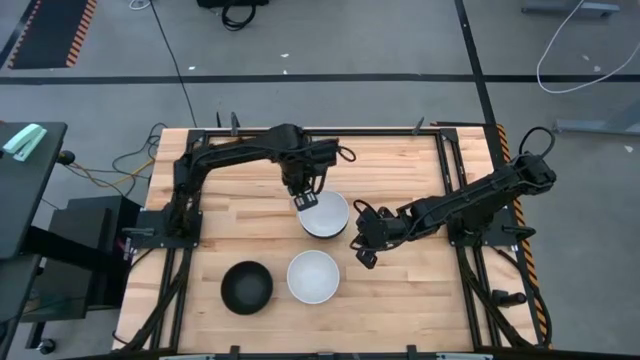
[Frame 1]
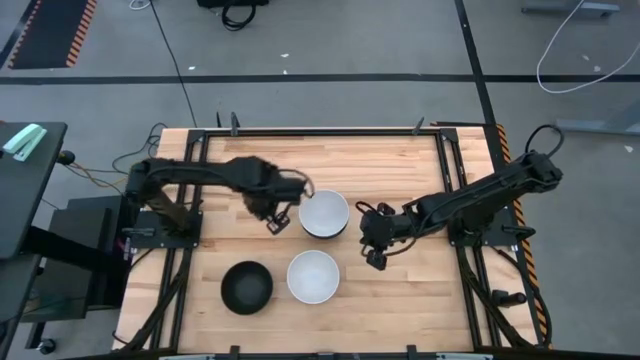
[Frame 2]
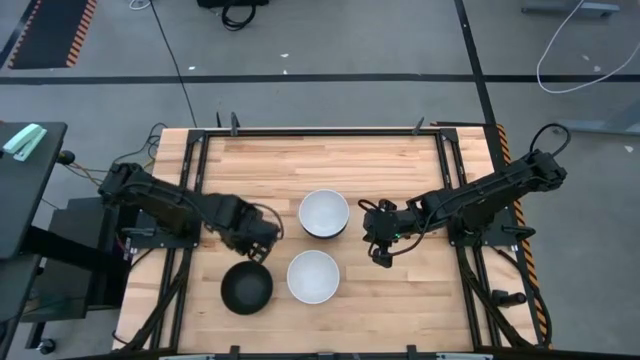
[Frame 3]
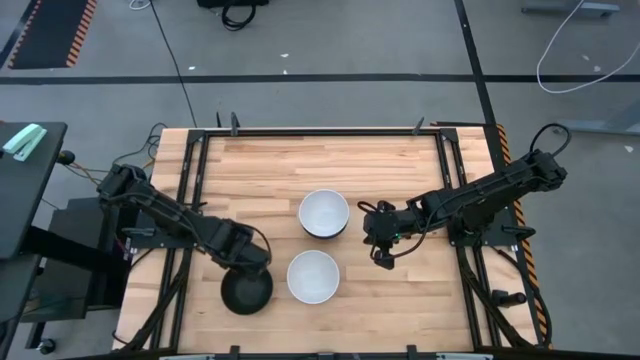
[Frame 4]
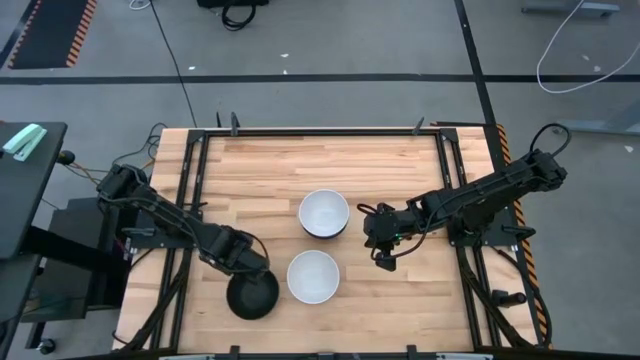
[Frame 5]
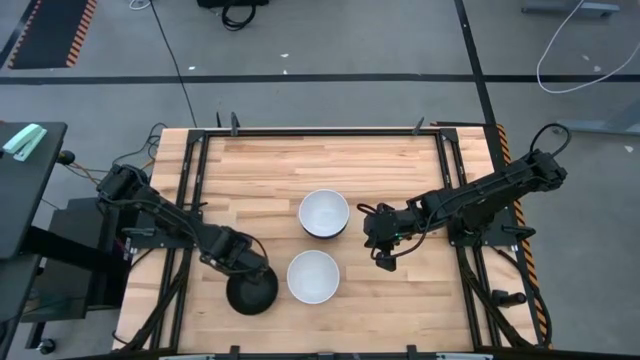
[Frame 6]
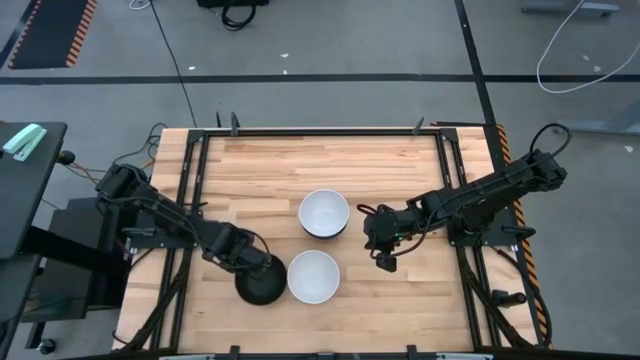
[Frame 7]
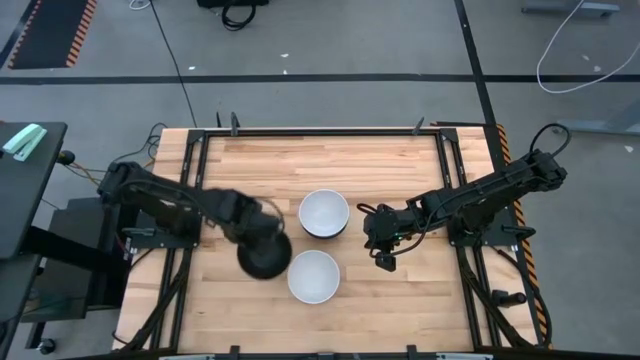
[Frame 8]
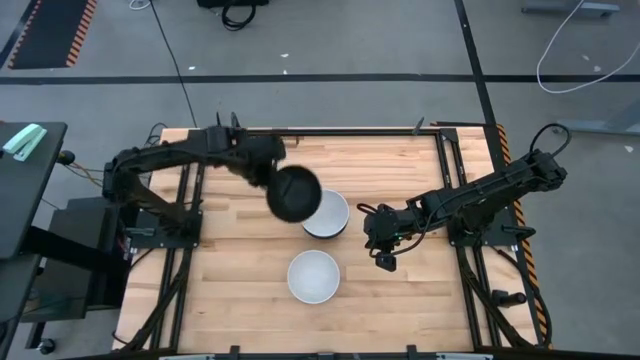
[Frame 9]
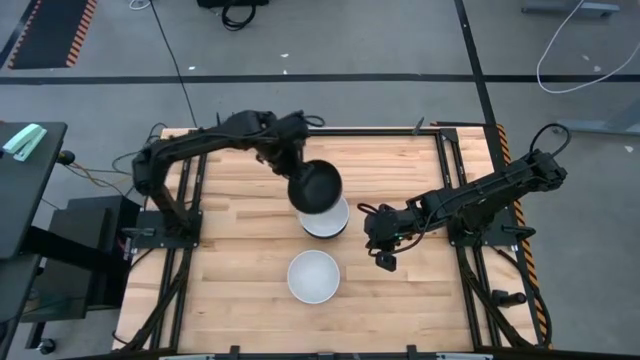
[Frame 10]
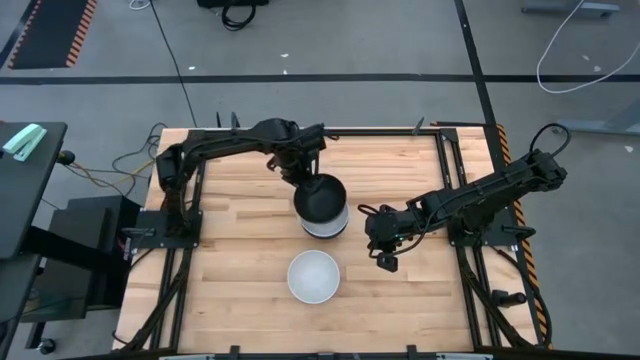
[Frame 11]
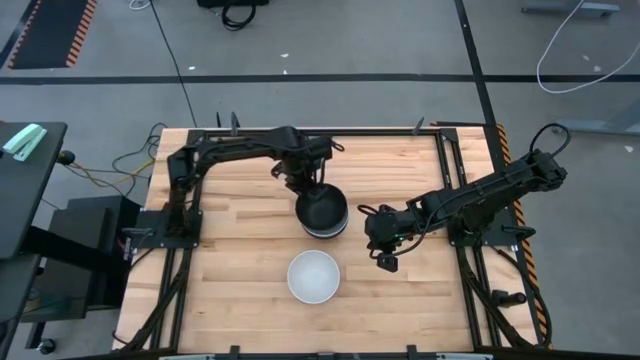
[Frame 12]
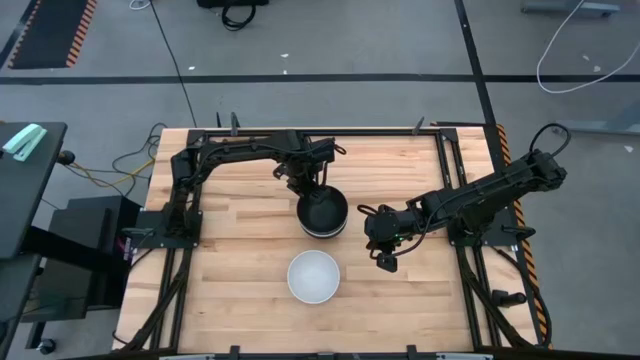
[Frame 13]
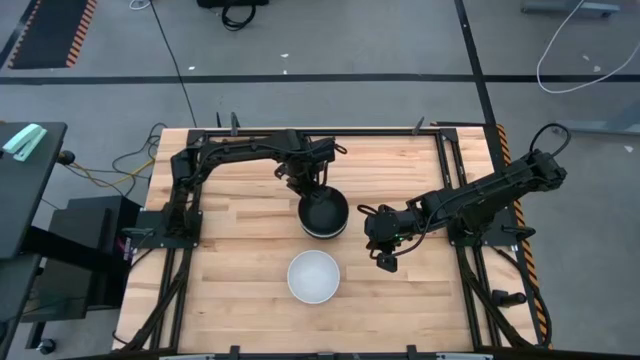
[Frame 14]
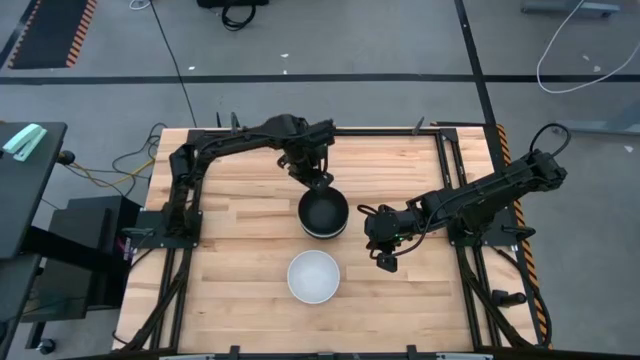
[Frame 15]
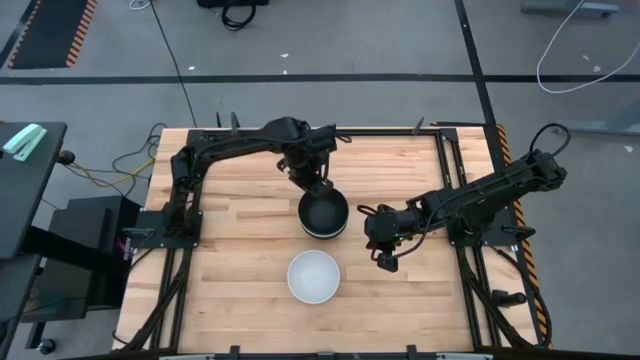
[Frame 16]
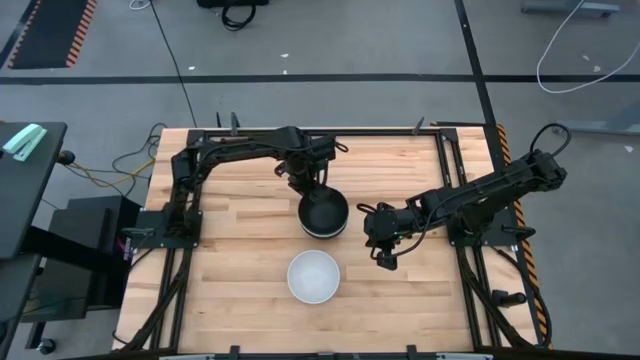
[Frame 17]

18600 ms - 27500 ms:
Task: Nest bowls inside each other
Stack the black bowl on top of the stacked bowls

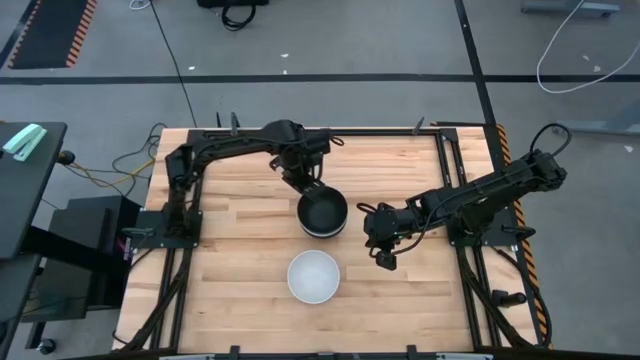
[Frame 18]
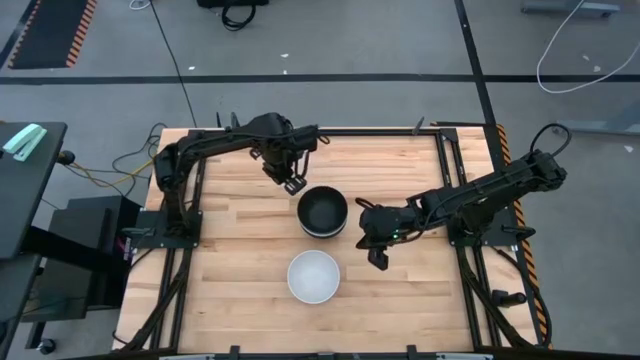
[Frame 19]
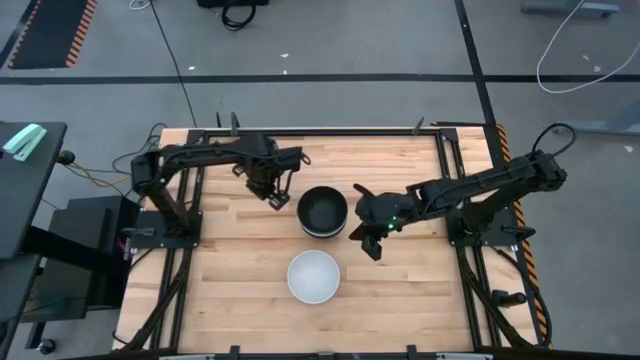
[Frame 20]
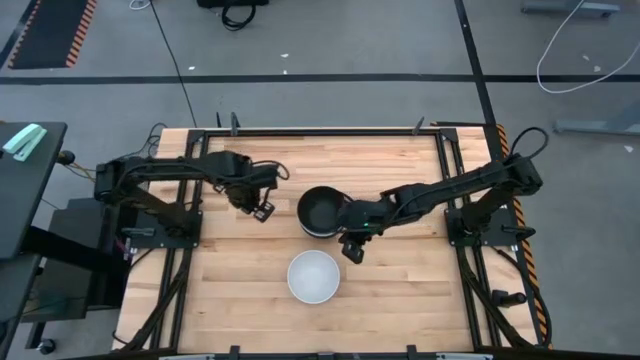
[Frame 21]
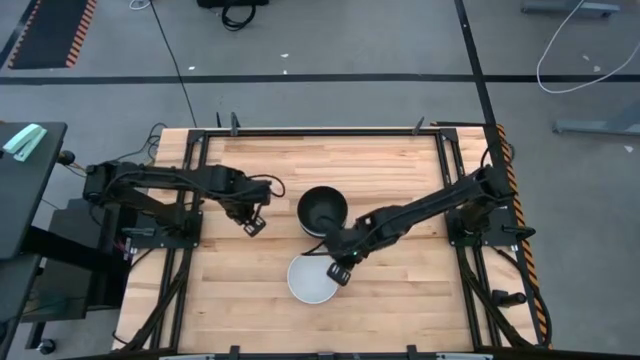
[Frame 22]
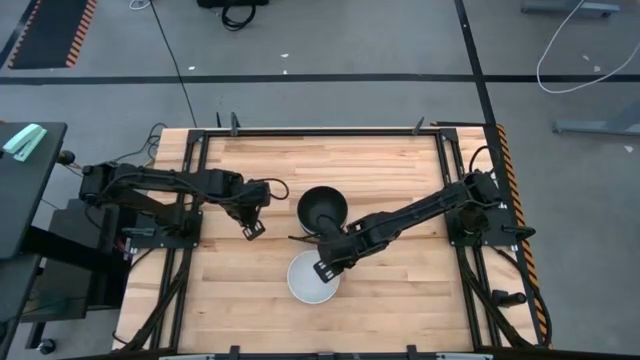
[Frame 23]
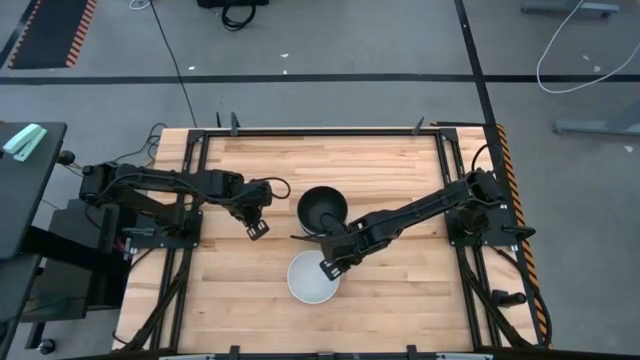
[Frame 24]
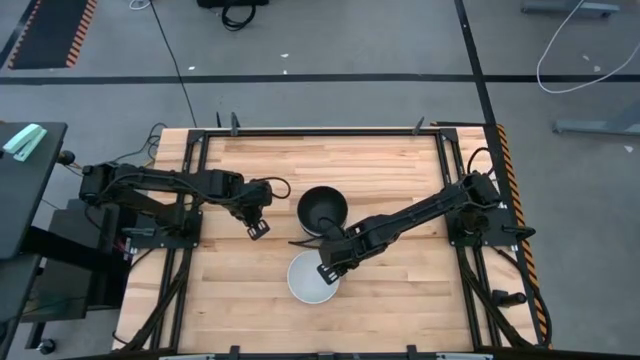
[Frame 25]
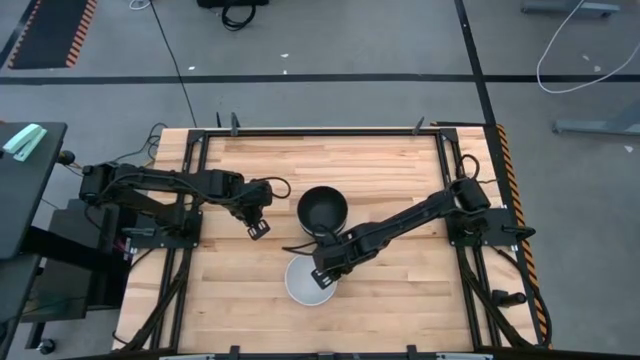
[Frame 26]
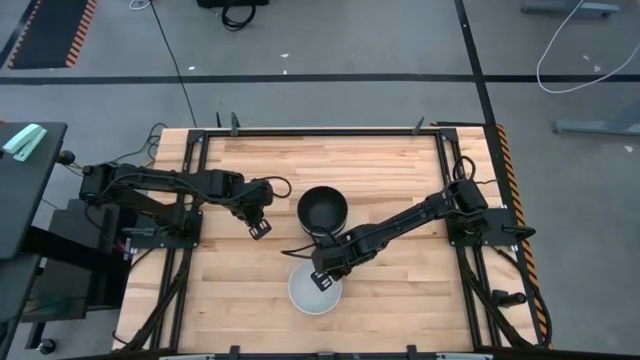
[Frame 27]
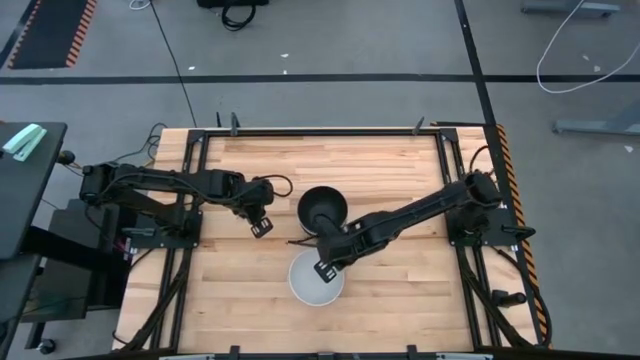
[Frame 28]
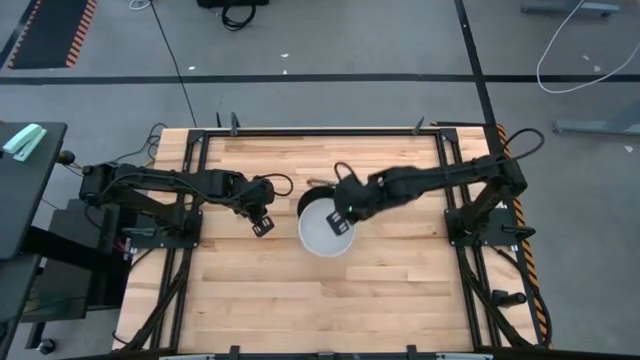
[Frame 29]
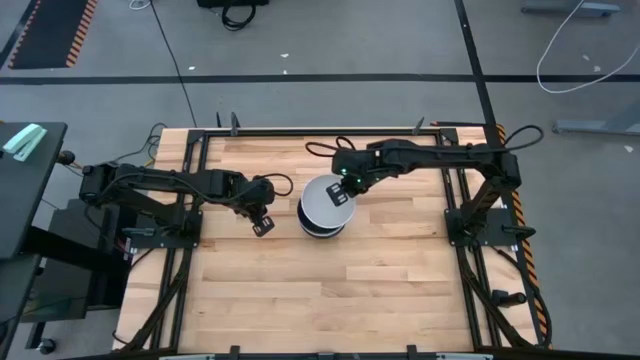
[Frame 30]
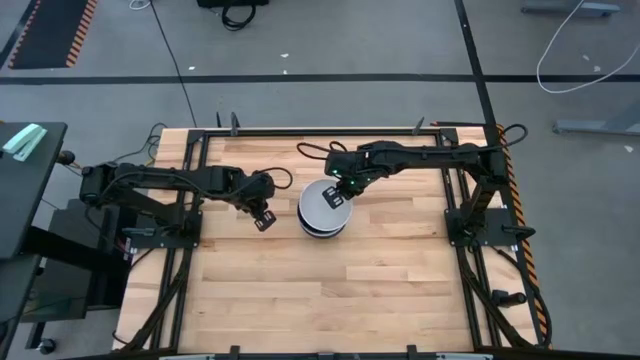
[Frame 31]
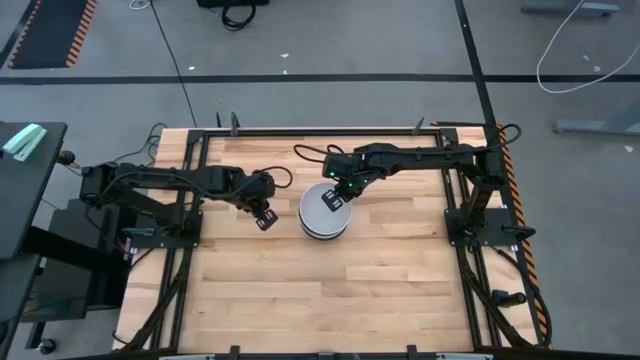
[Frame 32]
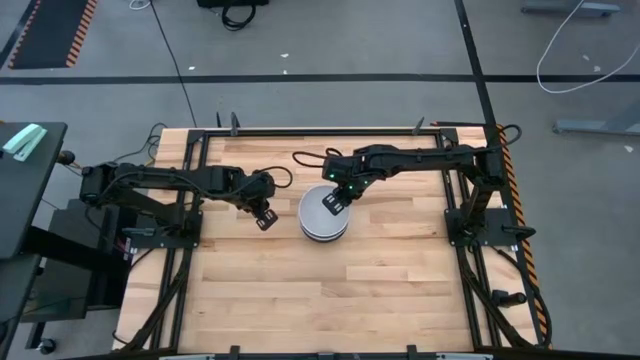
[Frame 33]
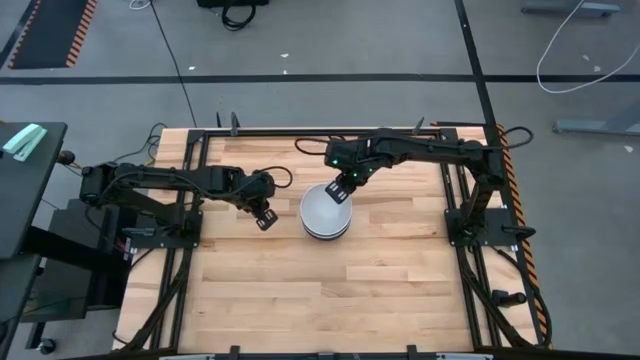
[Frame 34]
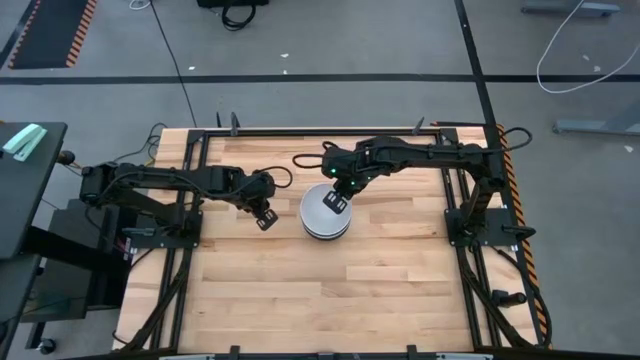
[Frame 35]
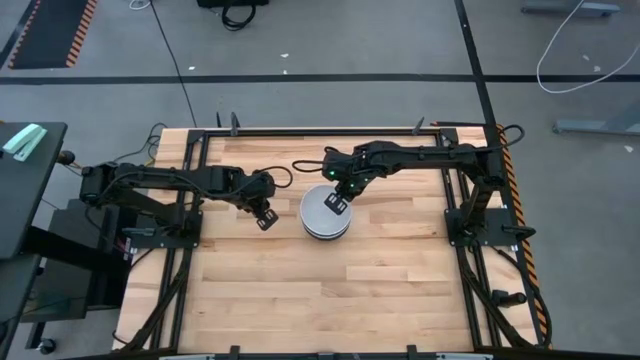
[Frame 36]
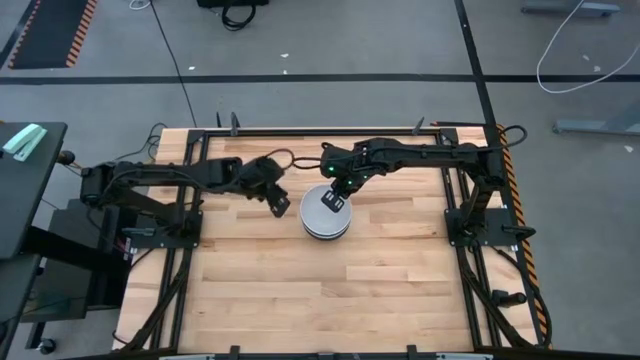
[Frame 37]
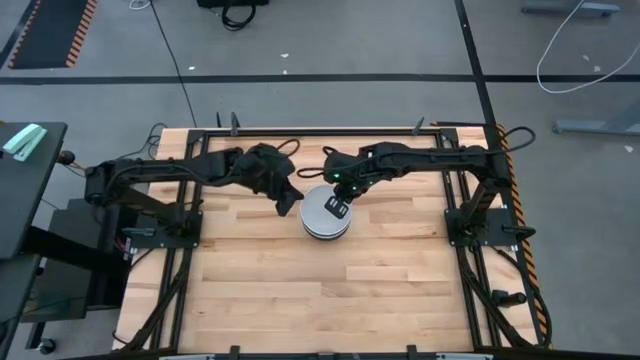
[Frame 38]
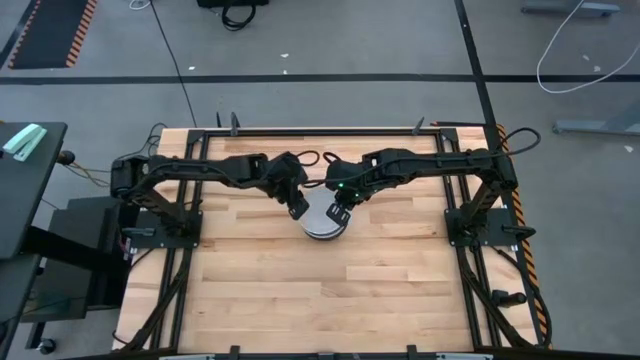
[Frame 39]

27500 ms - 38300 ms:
Stack the white bowl on top of the stacked bowls

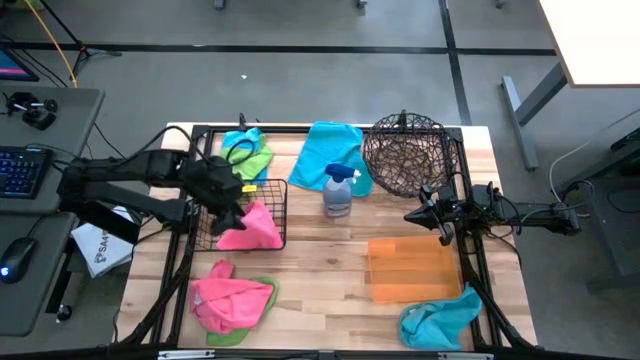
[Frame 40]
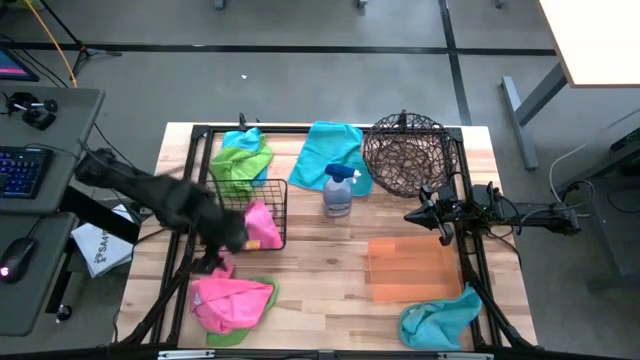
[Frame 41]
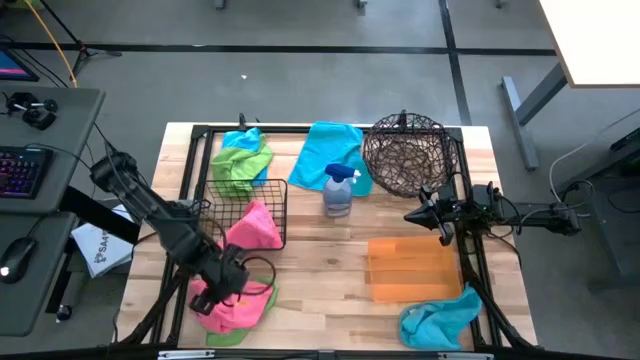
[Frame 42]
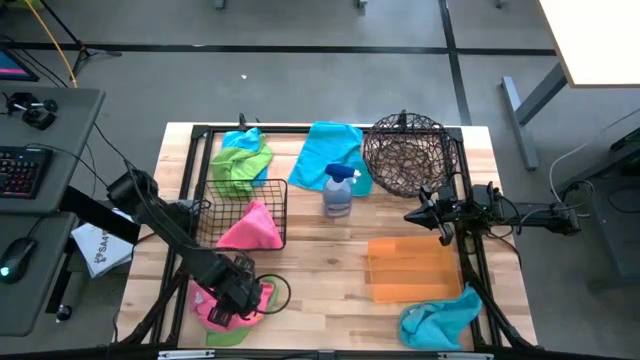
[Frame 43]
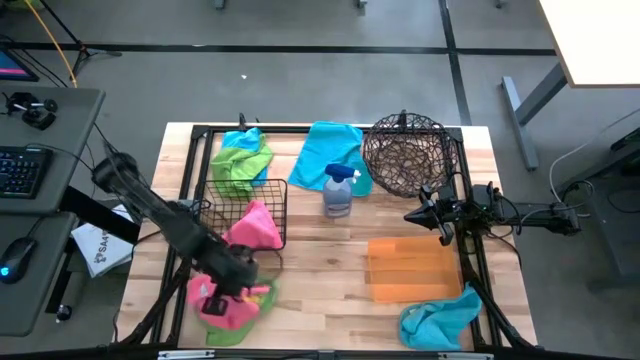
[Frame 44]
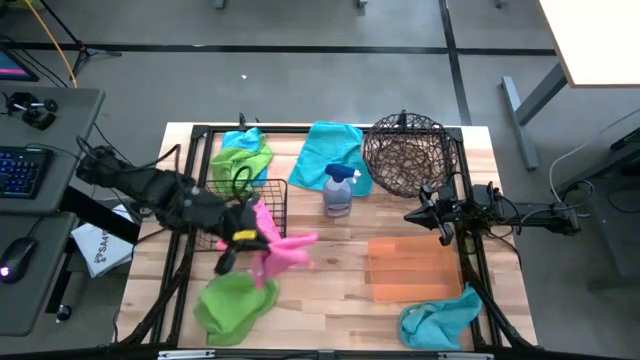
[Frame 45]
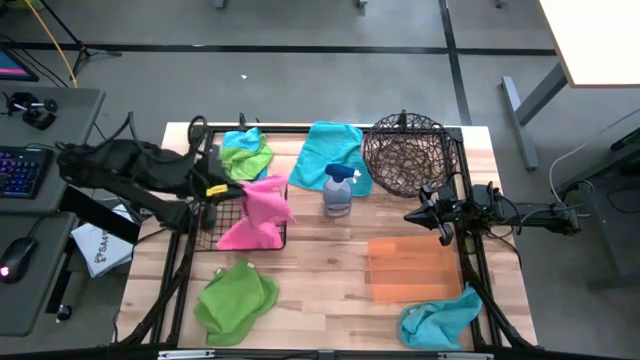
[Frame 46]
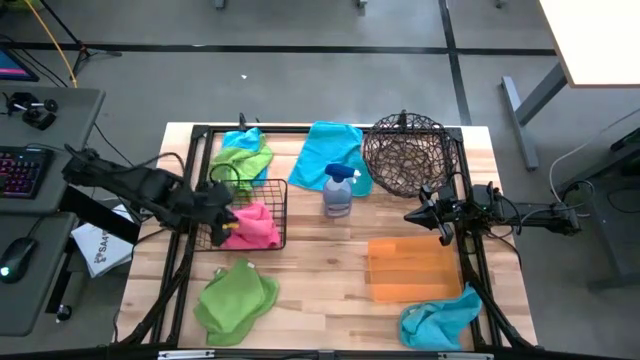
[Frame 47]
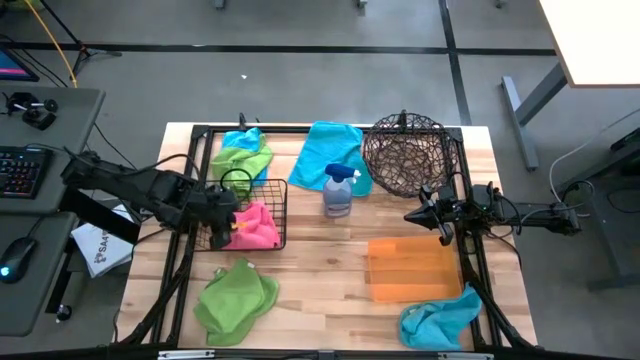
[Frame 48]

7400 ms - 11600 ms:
Task: Sort microfiber towel by color & place in baskets
Put the pink microfiber cloth into the left wire basket
